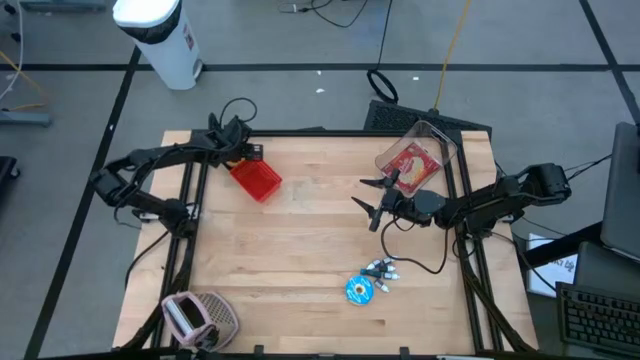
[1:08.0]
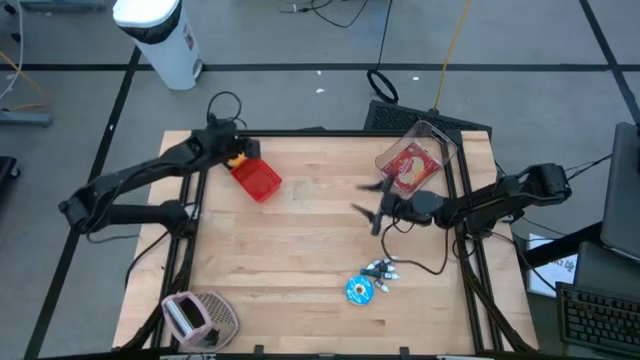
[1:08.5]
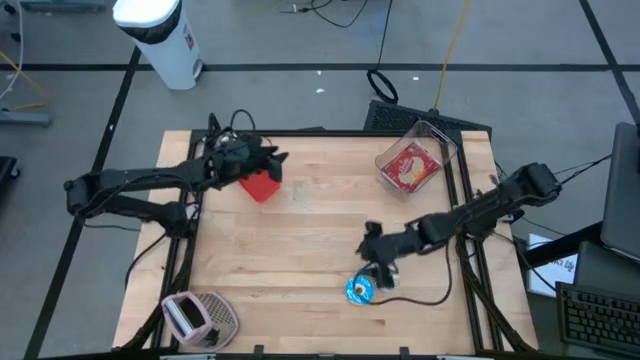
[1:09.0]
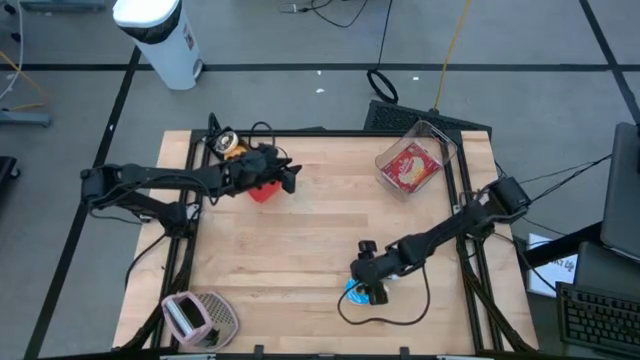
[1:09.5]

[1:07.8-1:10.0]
Put the blue donut into the black bin

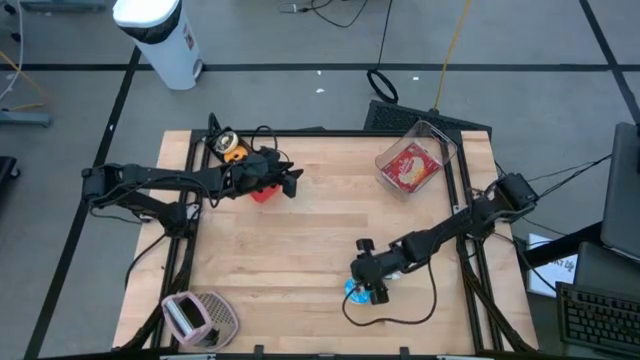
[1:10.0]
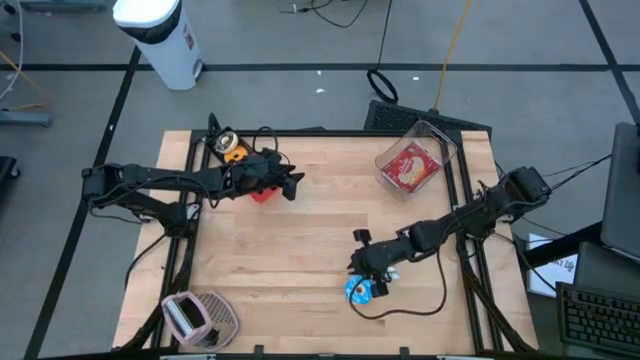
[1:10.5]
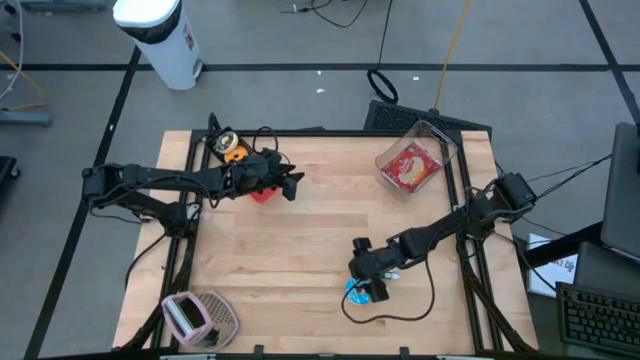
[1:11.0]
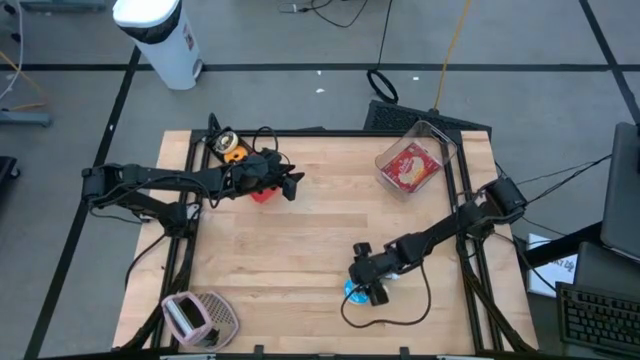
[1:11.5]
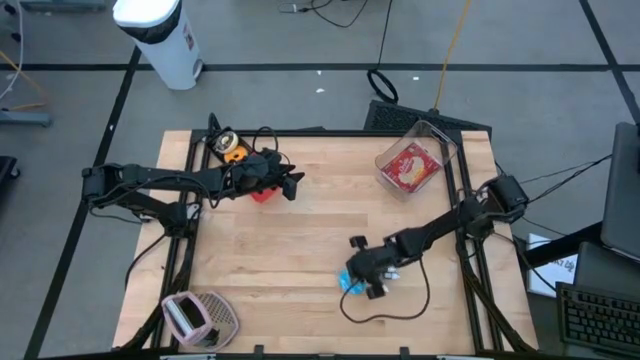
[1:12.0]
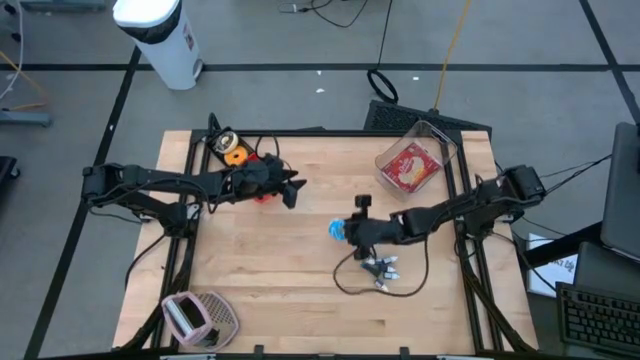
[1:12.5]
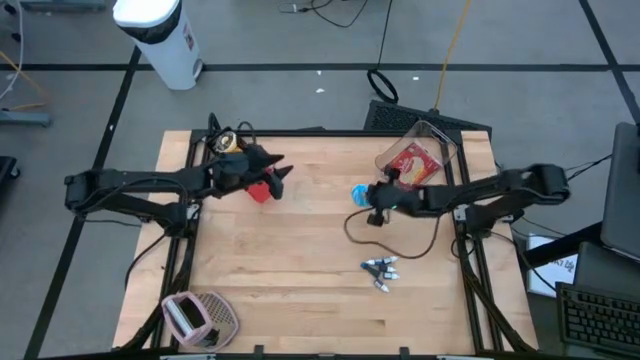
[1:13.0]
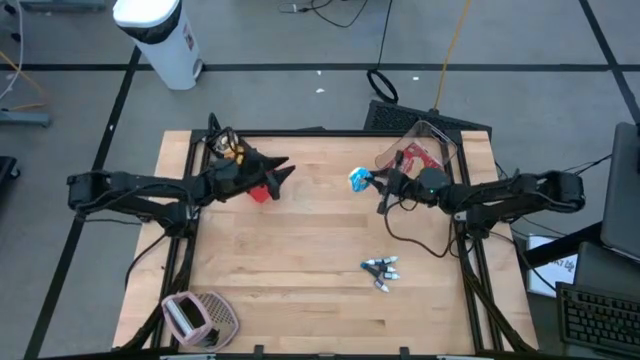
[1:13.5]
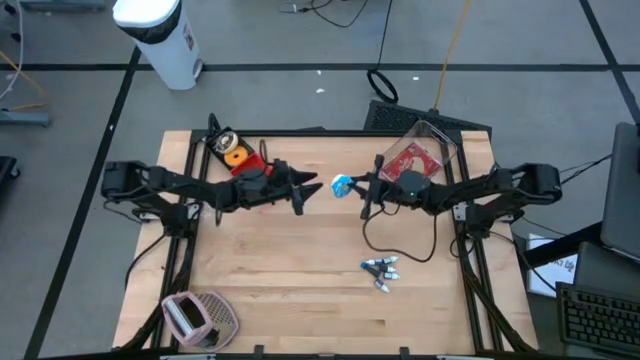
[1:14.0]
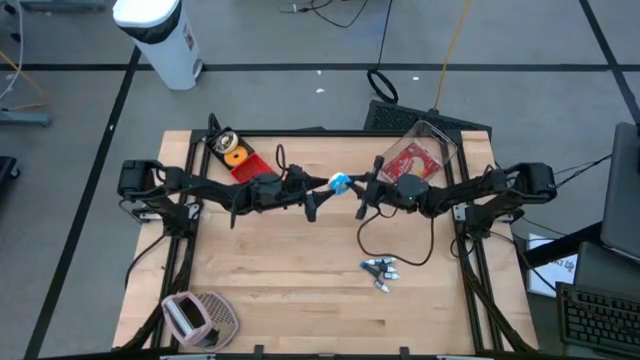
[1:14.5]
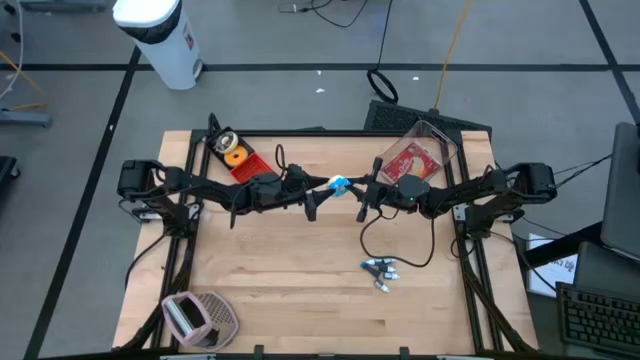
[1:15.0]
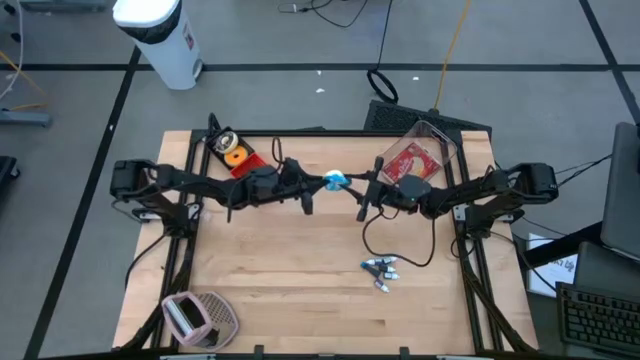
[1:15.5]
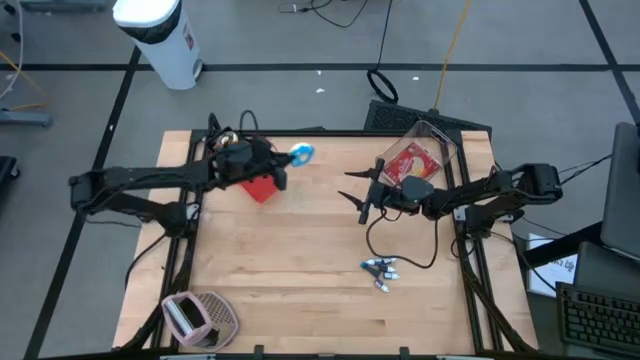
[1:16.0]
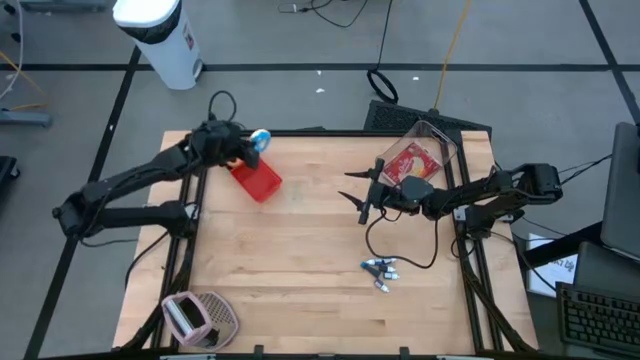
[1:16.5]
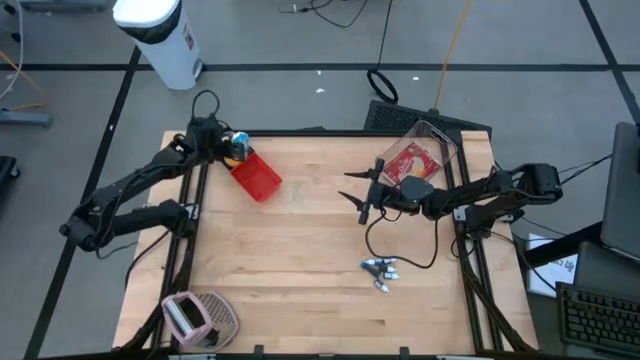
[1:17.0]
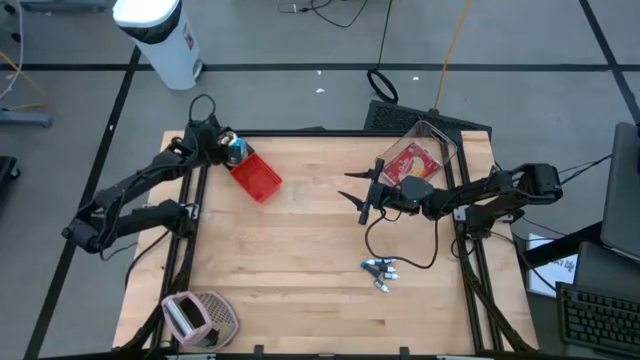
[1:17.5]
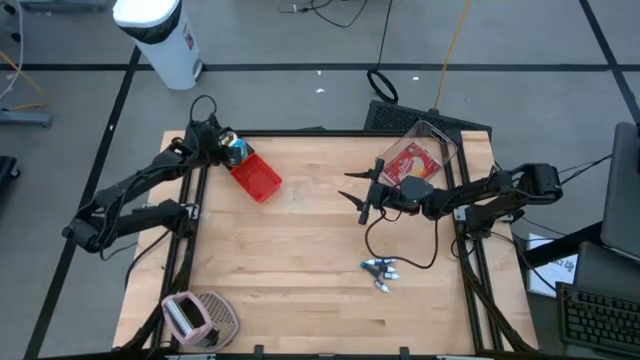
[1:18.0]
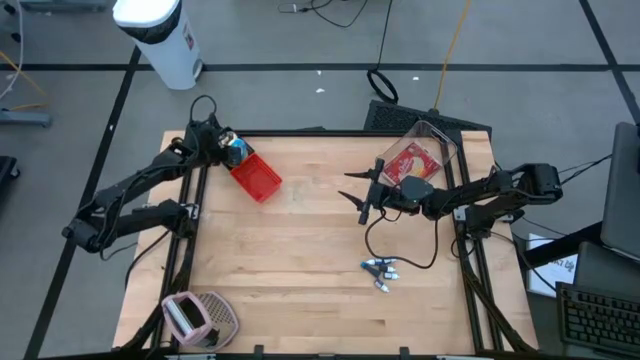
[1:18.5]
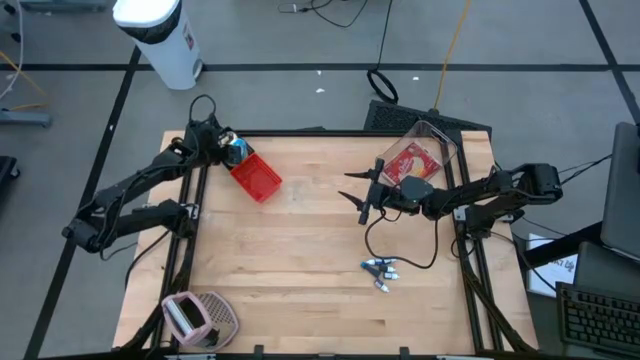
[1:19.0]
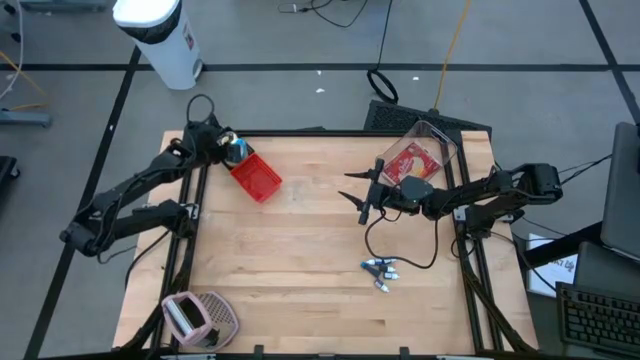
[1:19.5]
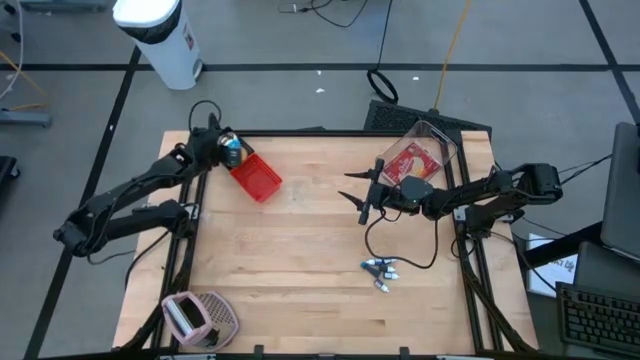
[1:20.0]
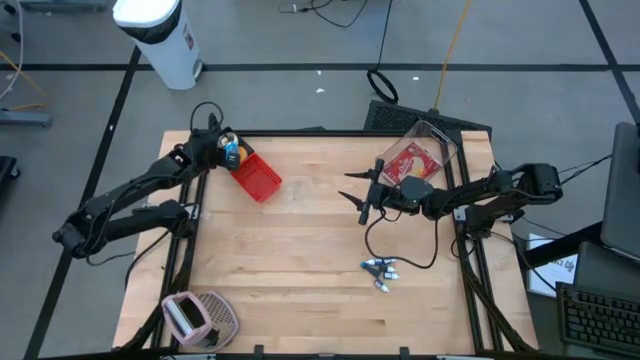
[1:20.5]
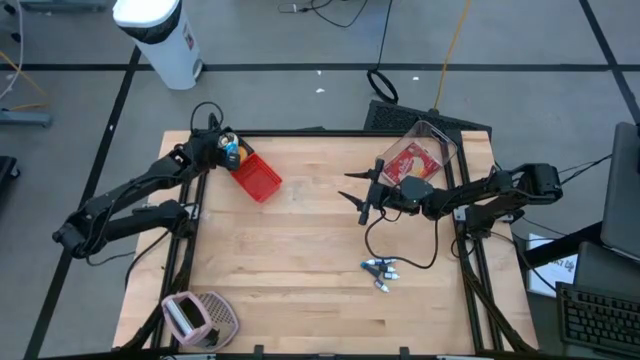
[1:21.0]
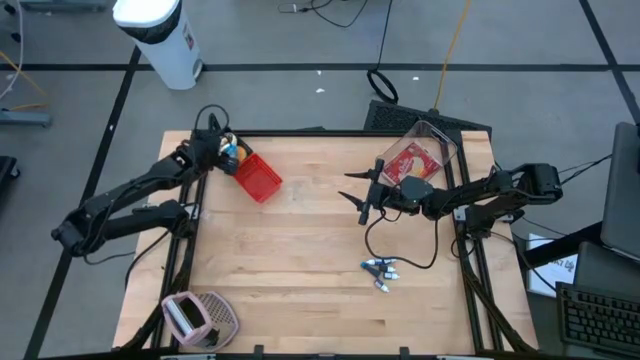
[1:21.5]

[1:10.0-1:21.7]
Put the blue donut into the black bin

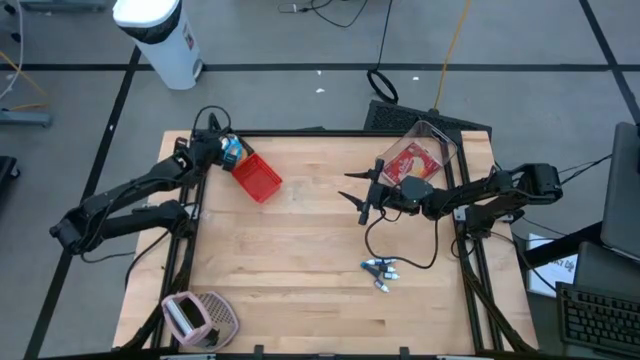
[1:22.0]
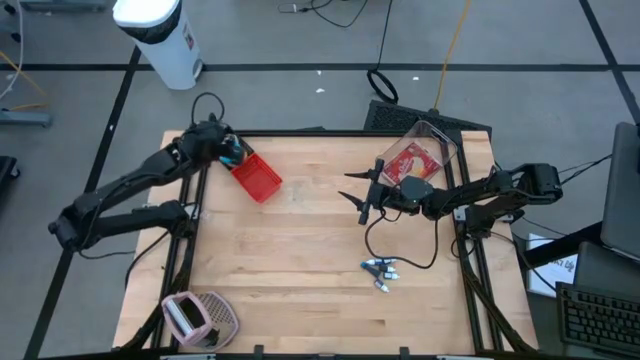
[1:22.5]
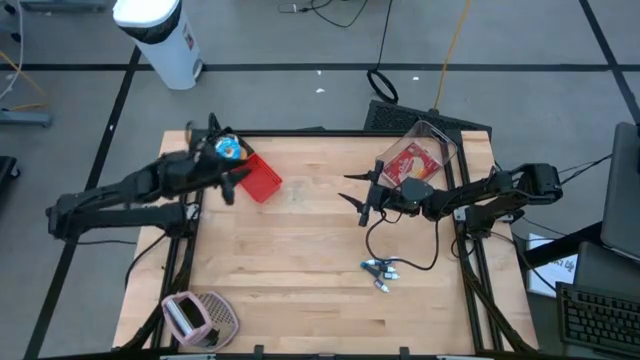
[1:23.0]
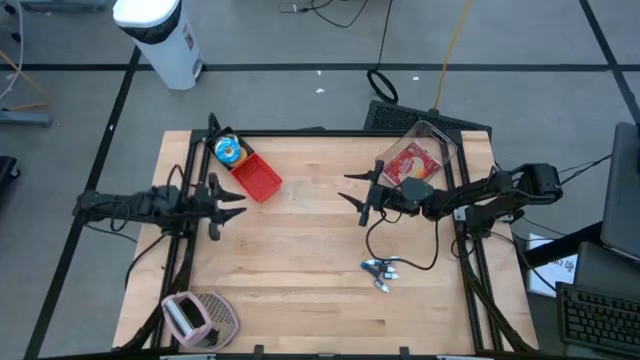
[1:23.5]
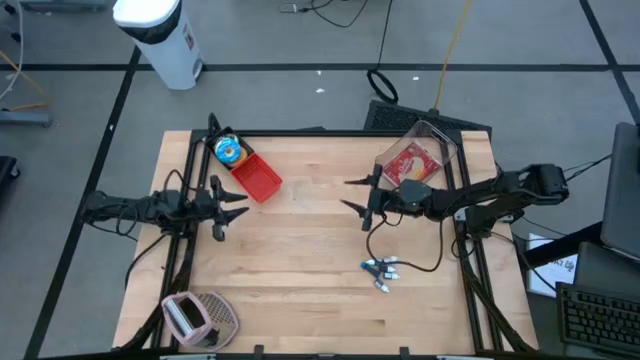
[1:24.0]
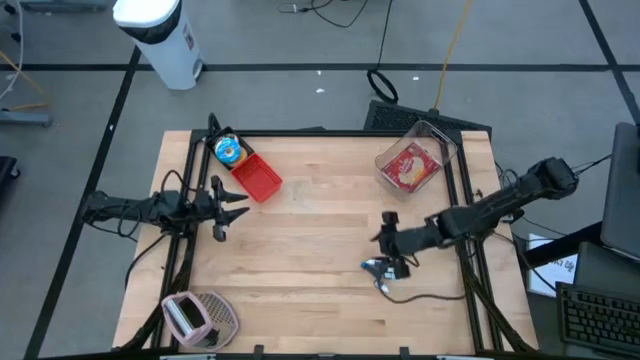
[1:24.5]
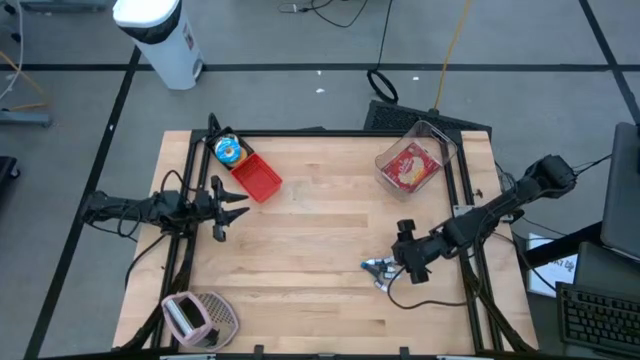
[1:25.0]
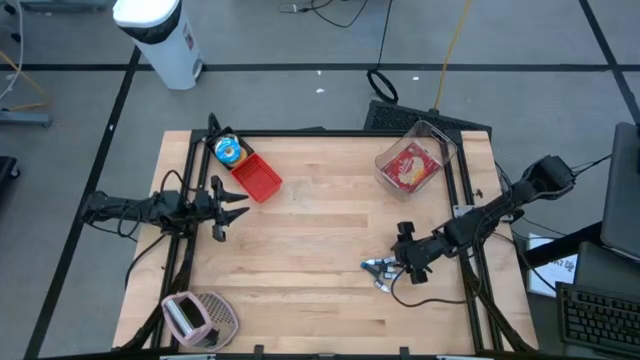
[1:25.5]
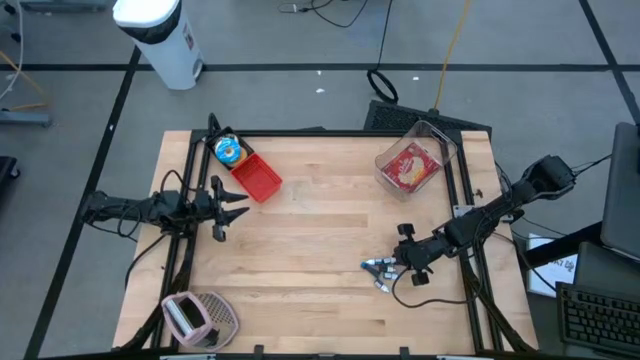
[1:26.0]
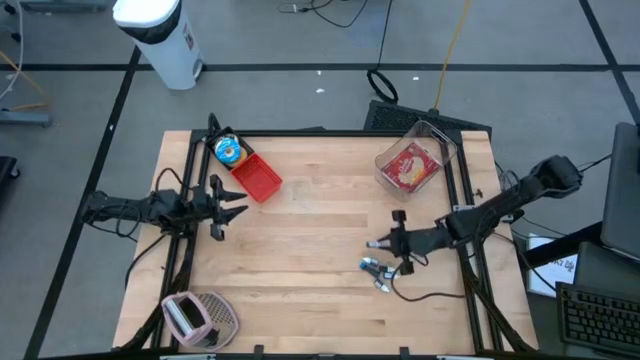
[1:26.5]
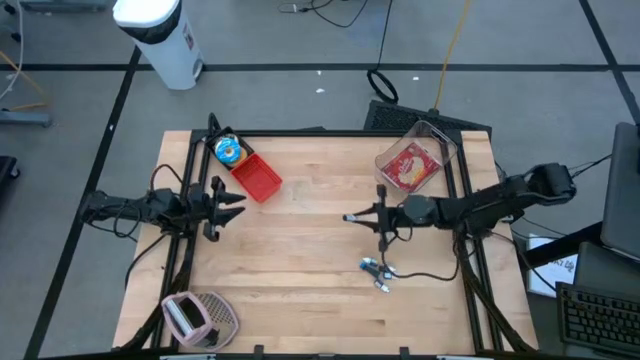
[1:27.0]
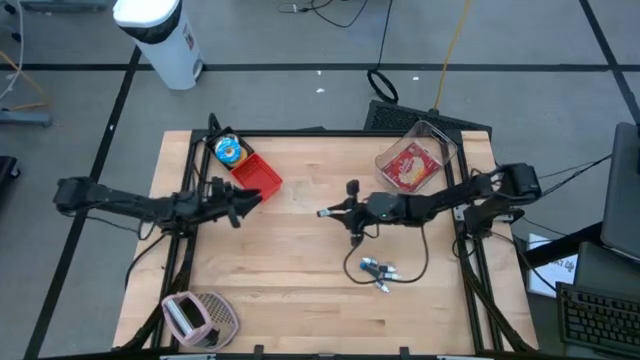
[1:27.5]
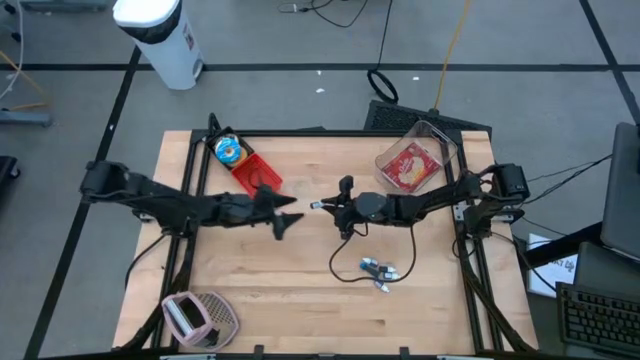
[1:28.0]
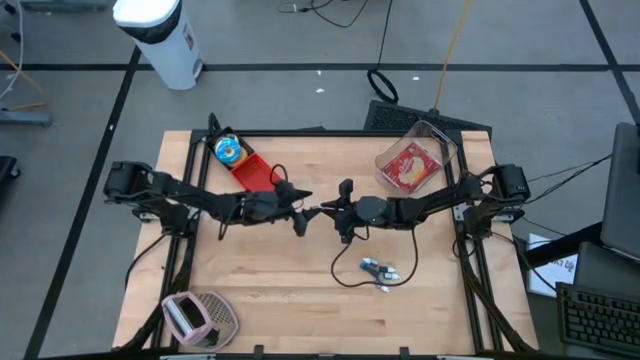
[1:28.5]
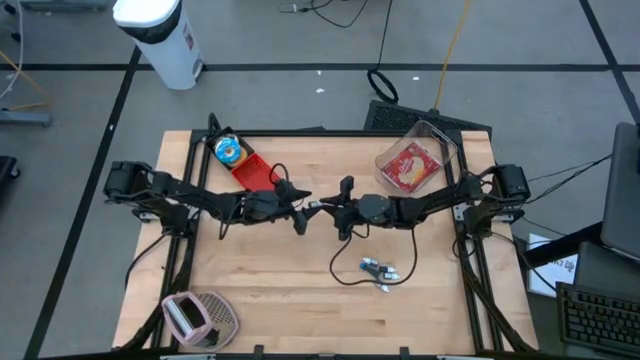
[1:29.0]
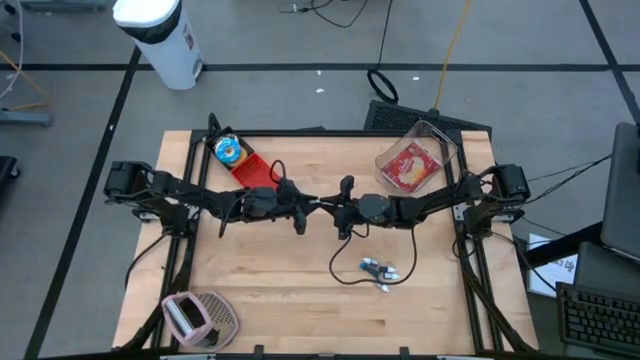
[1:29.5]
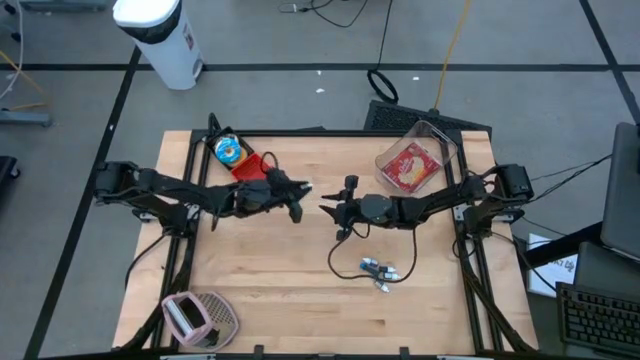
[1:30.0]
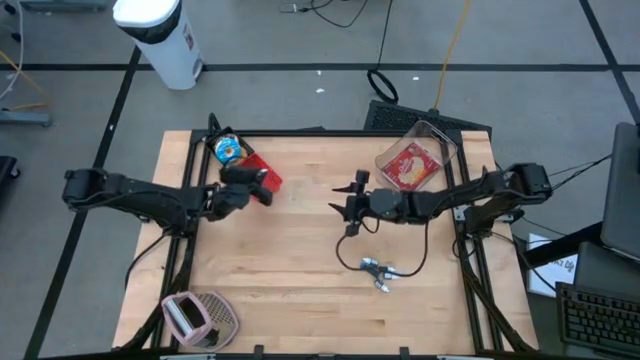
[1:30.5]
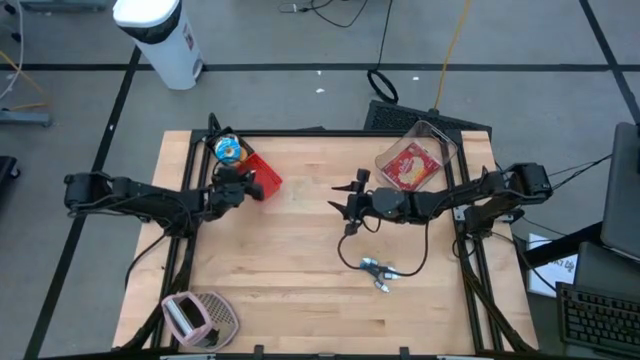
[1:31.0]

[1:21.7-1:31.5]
Put the top green food coloring bottle into the red bin
